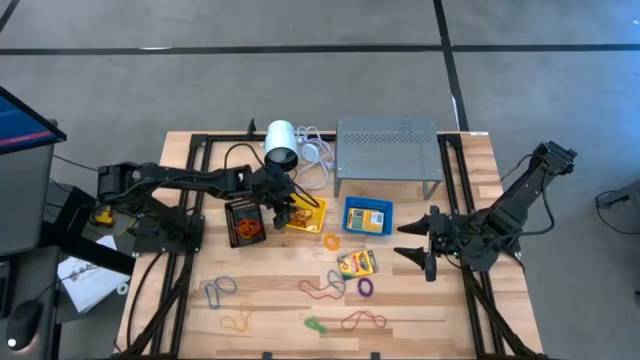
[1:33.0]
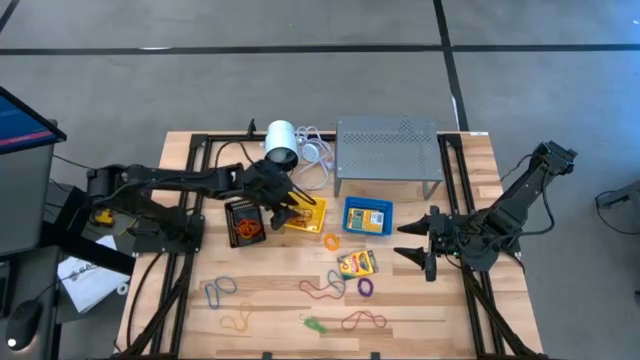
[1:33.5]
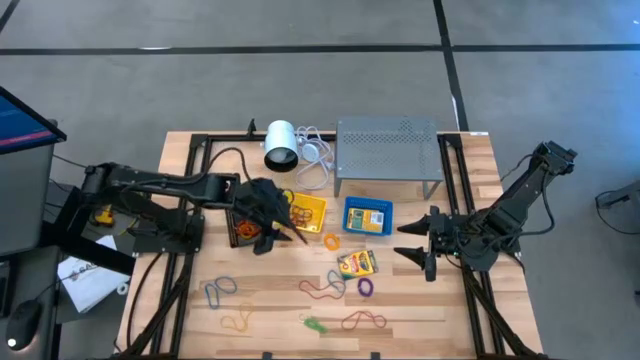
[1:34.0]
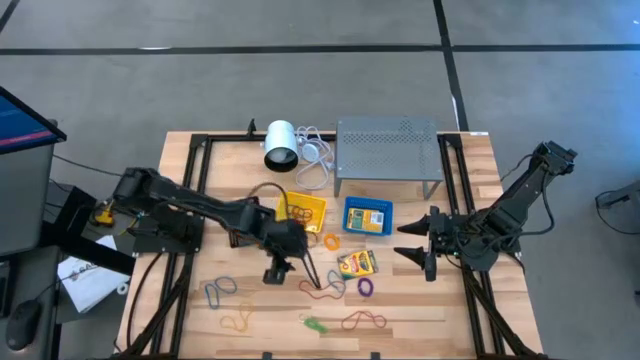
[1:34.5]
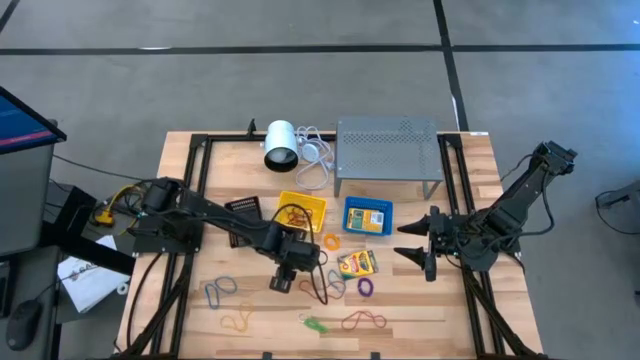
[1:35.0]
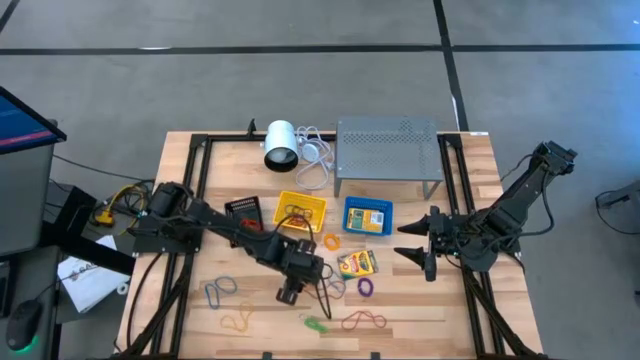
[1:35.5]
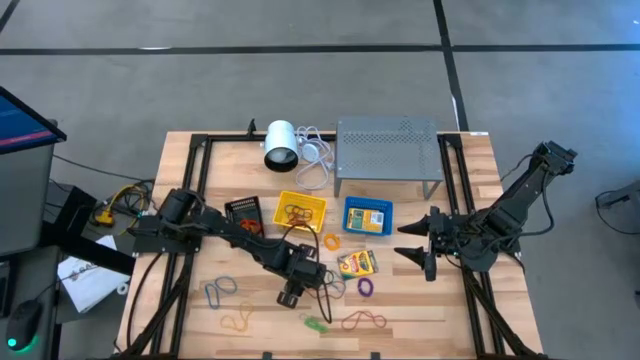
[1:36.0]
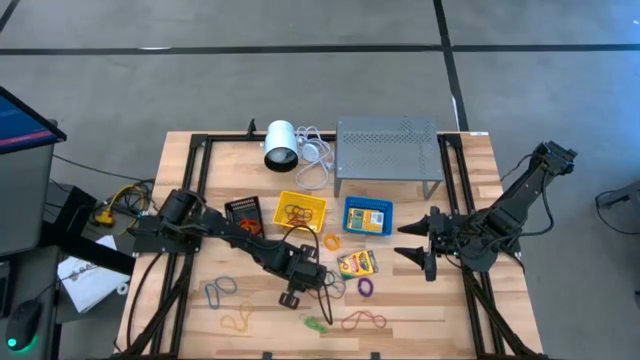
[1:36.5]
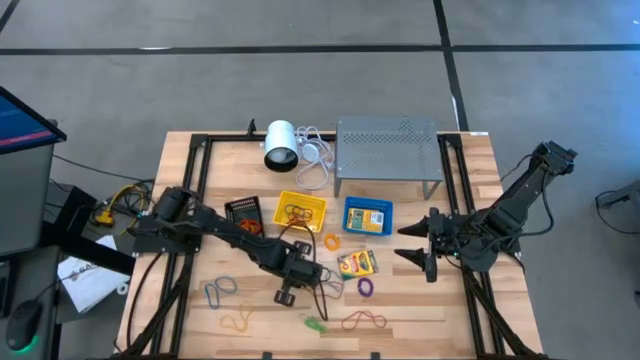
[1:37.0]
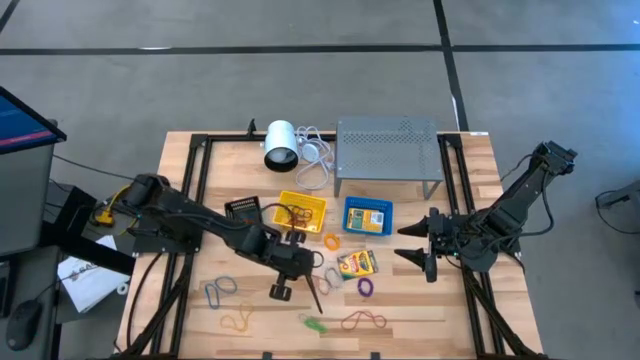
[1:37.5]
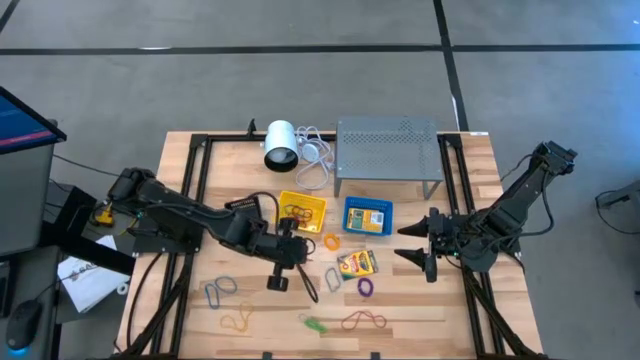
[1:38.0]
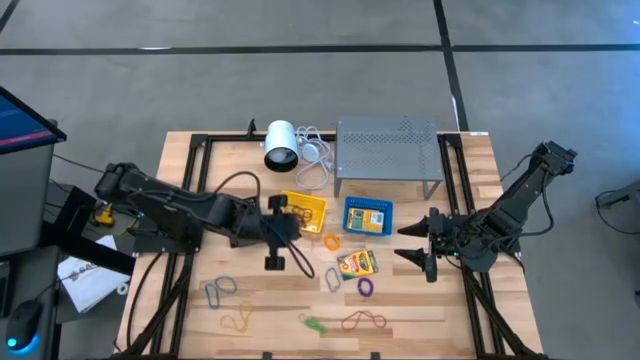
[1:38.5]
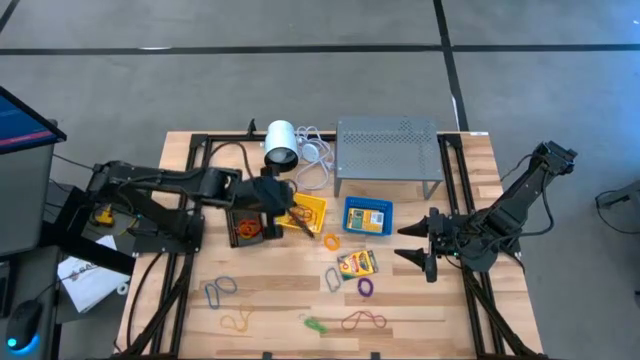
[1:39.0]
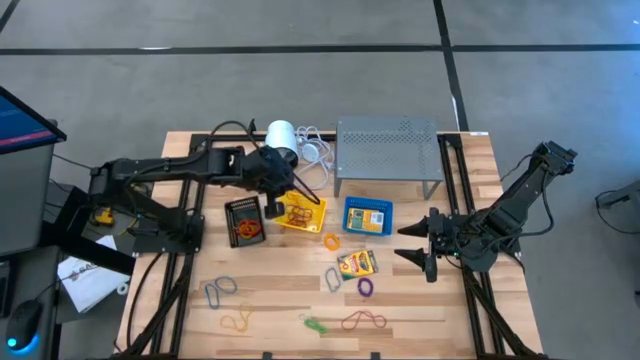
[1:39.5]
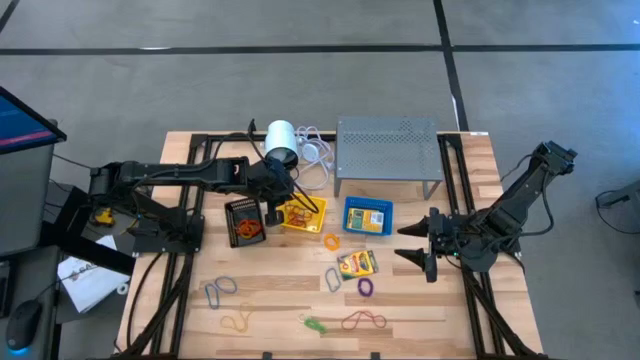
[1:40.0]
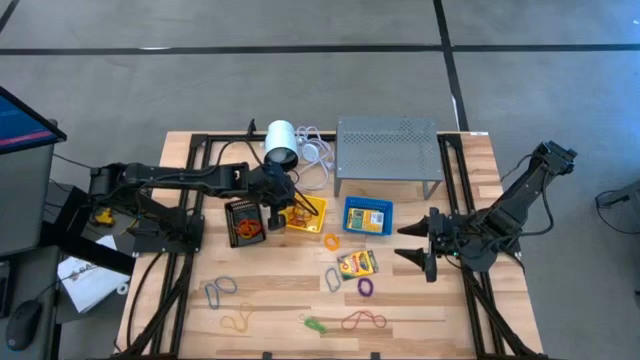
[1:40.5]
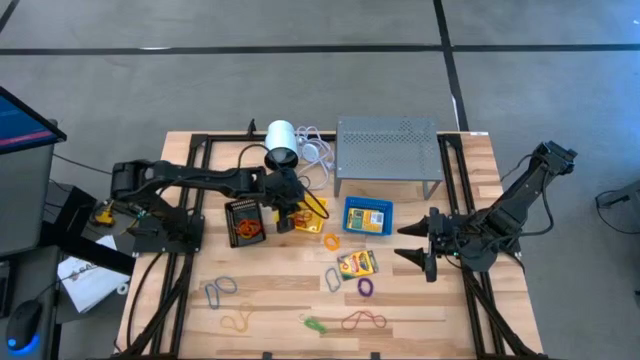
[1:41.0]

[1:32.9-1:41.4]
Task: Pick & Place Office Desk Supplies
Put the red rubber band into the yellow bin

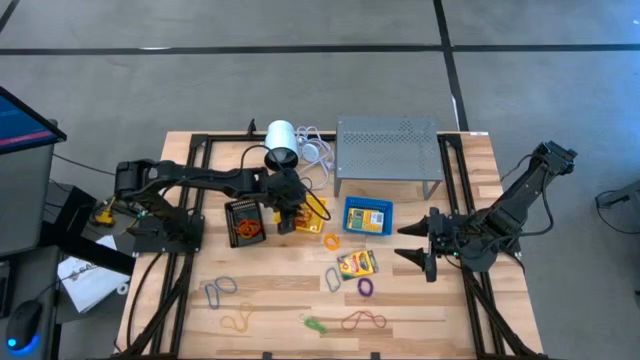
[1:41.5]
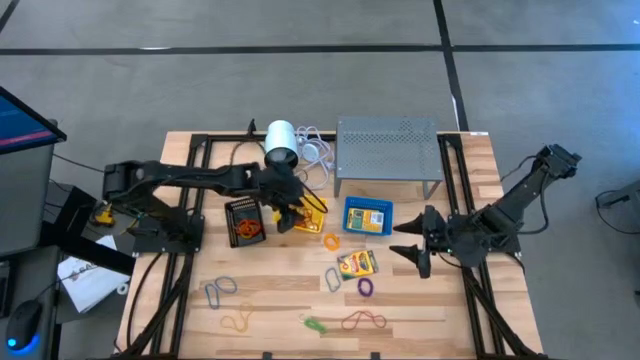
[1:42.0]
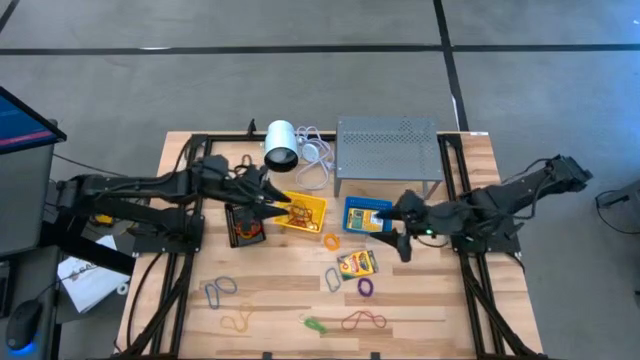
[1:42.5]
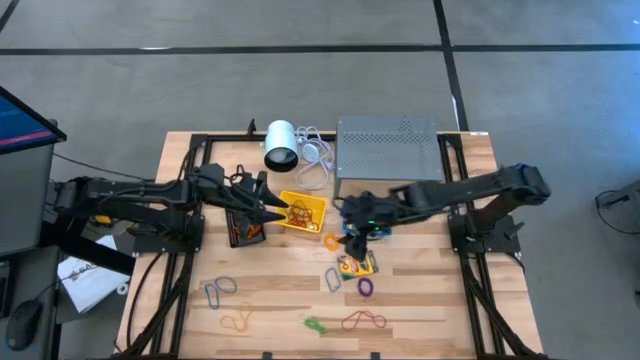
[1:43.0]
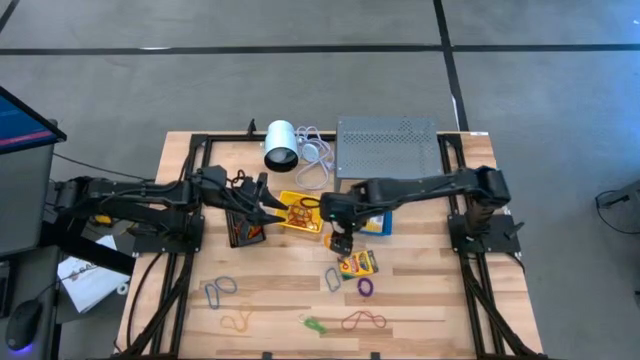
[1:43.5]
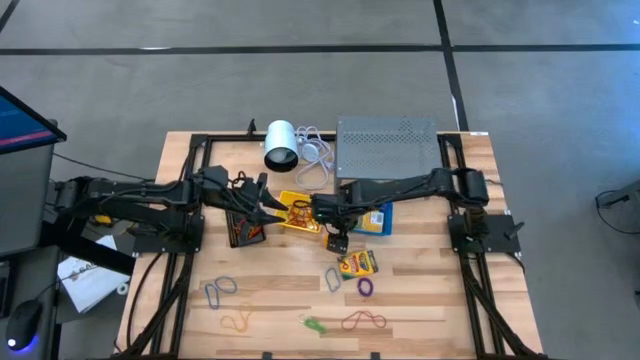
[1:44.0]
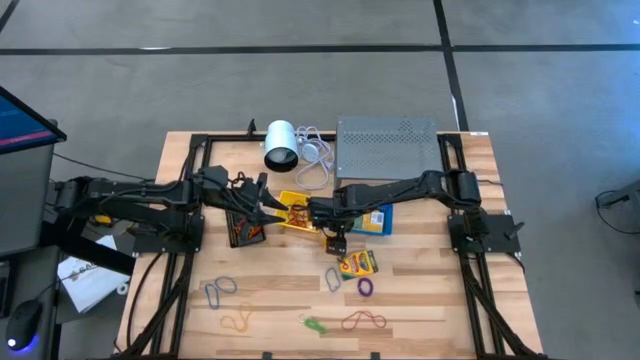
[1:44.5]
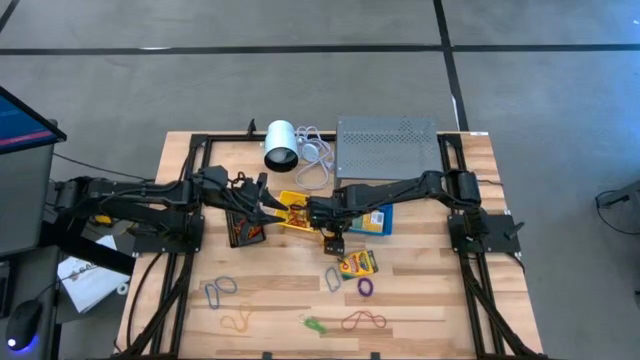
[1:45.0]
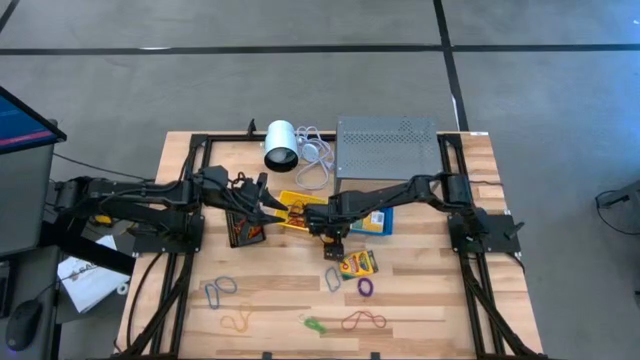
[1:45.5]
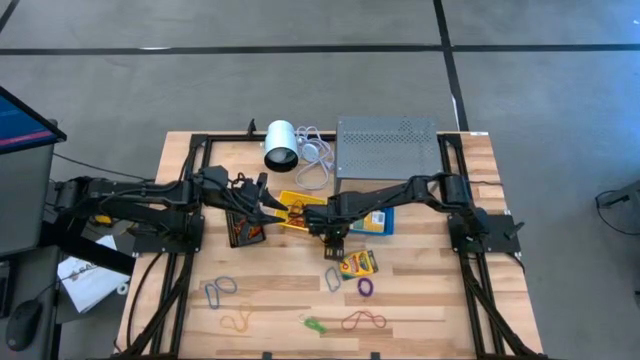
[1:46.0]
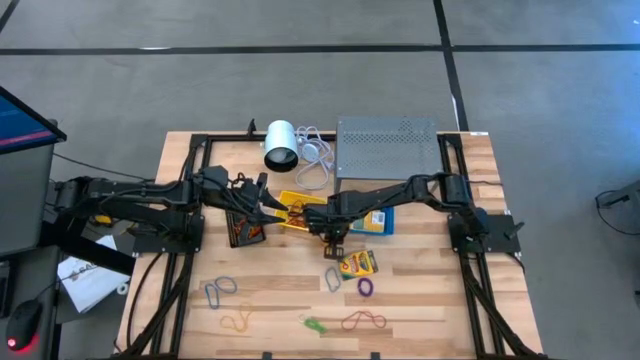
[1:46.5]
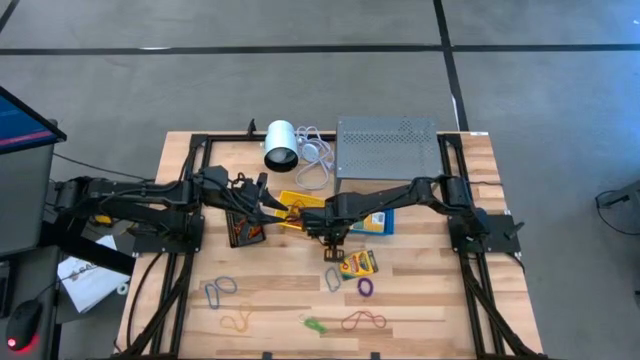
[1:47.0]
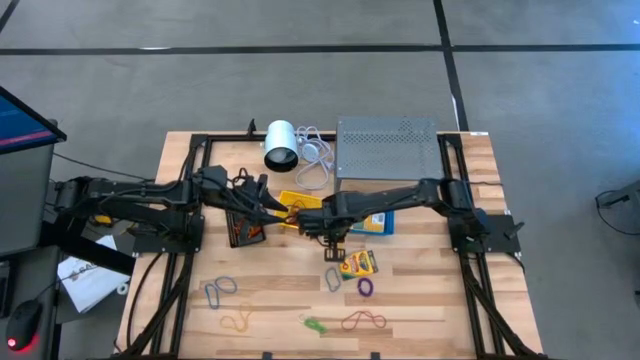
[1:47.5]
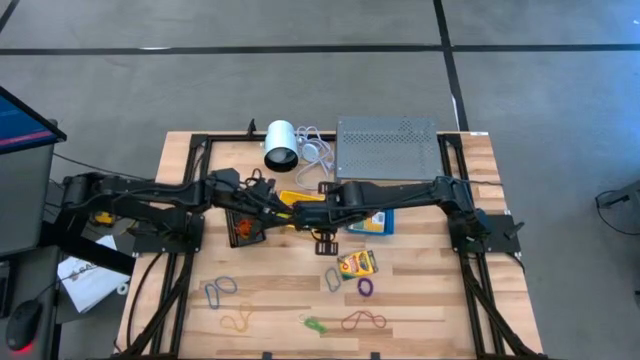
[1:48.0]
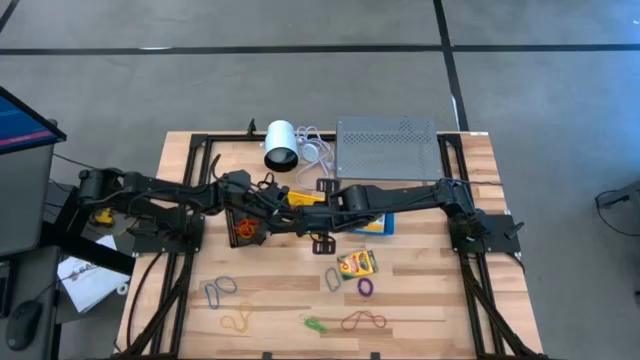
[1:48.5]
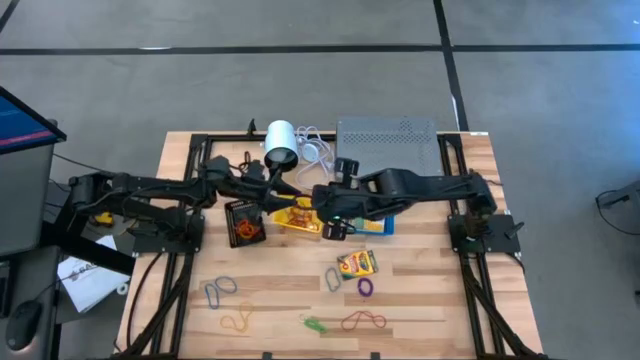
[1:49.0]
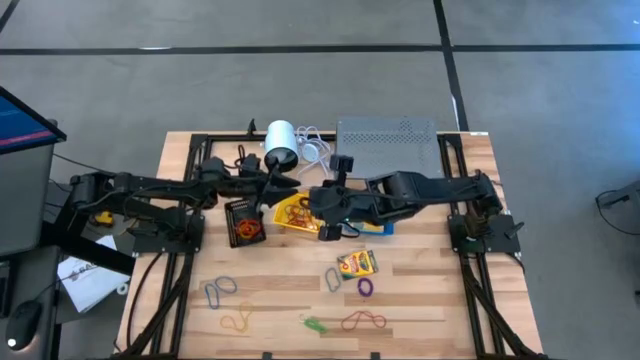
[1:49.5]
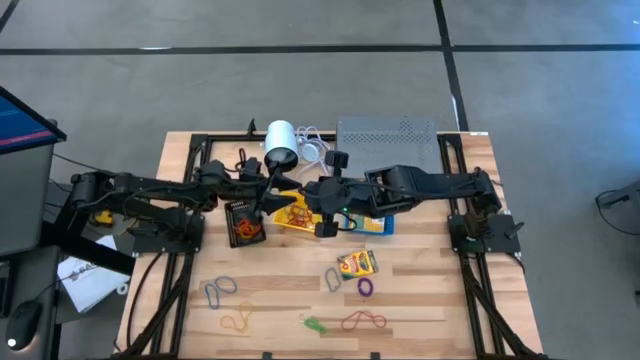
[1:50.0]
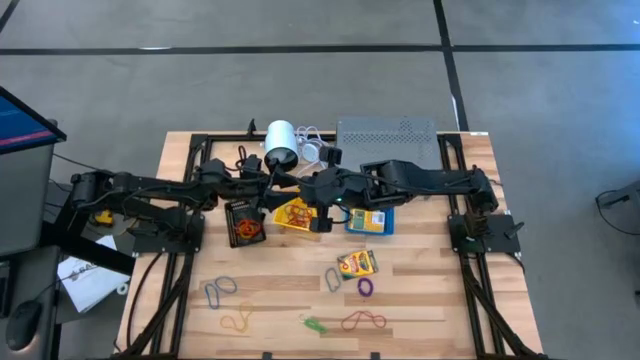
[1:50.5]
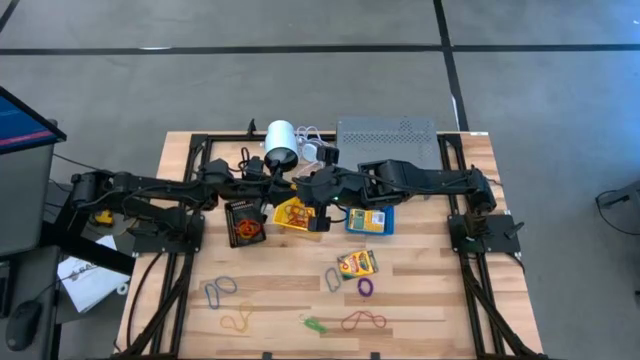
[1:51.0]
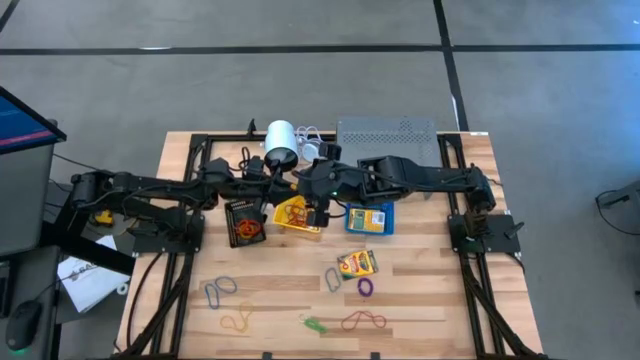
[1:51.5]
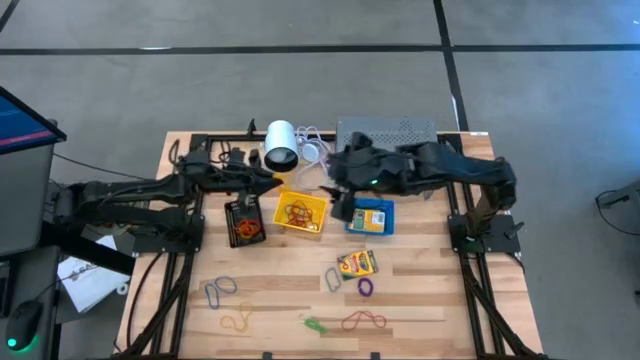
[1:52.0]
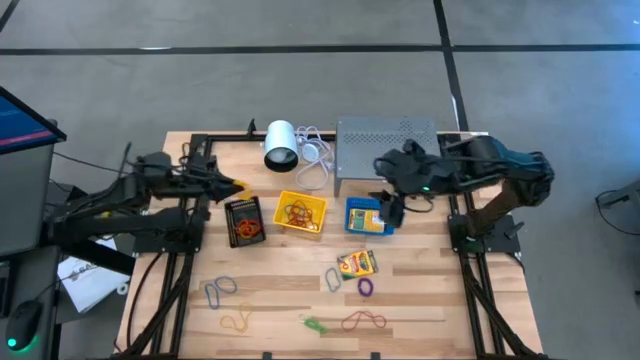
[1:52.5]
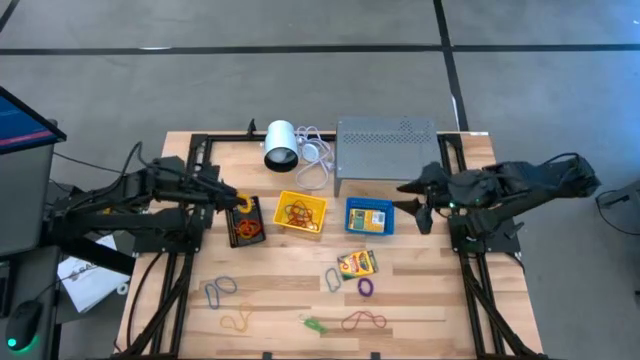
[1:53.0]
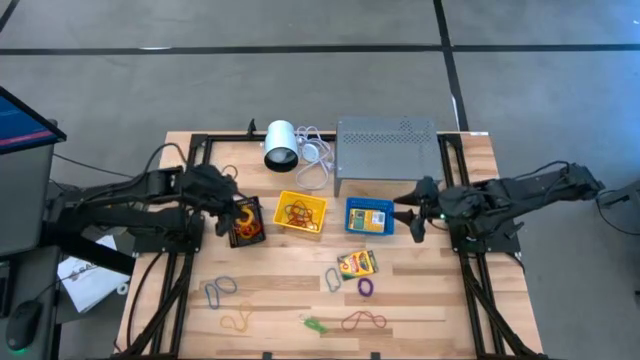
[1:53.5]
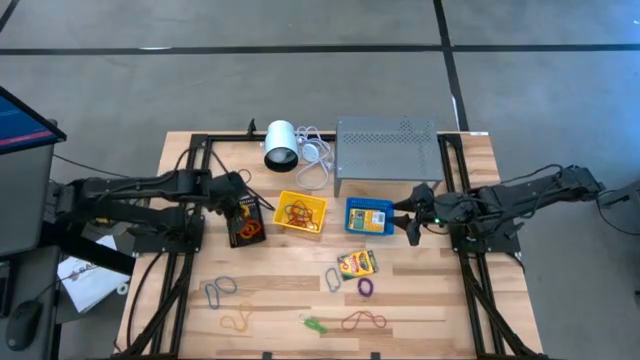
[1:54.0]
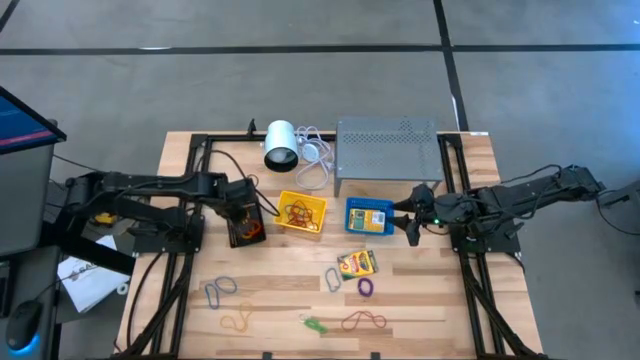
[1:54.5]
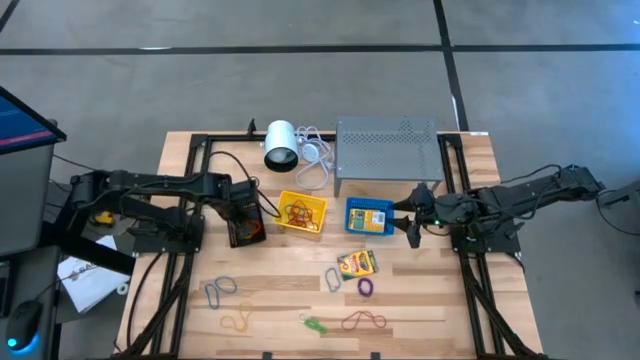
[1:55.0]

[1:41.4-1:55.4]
Put the yellow spring keychain into the black bin
